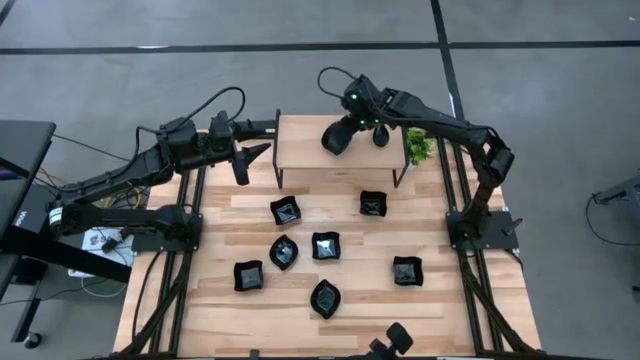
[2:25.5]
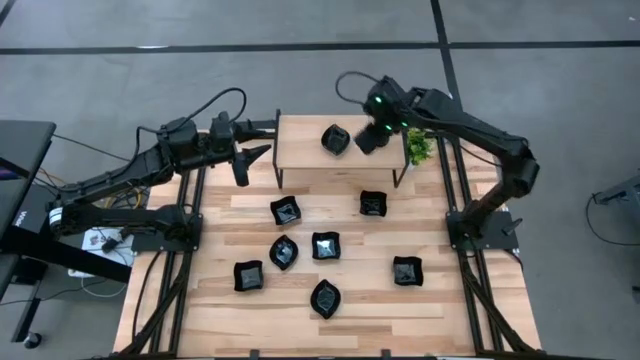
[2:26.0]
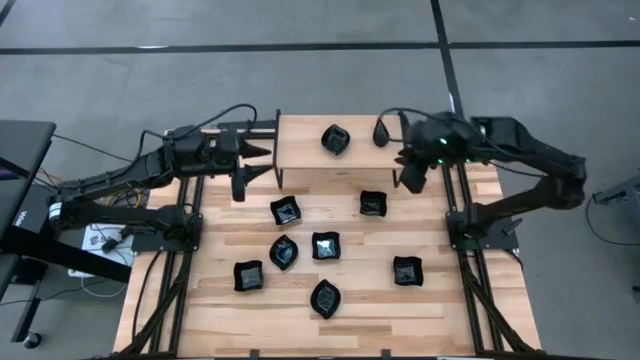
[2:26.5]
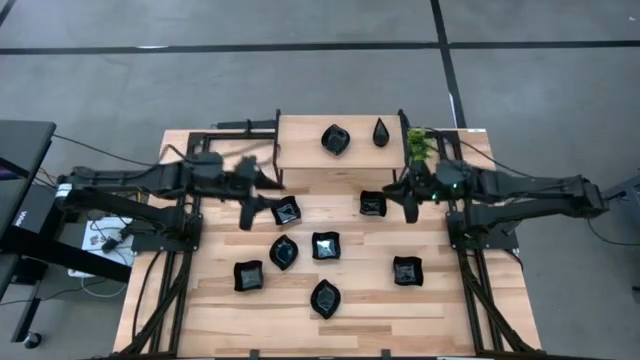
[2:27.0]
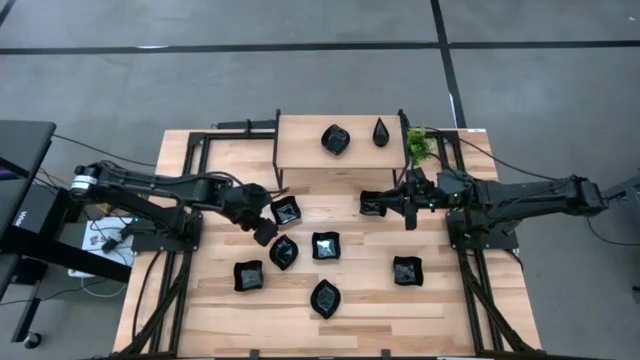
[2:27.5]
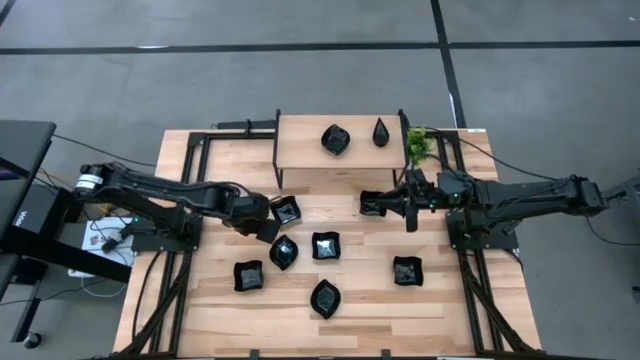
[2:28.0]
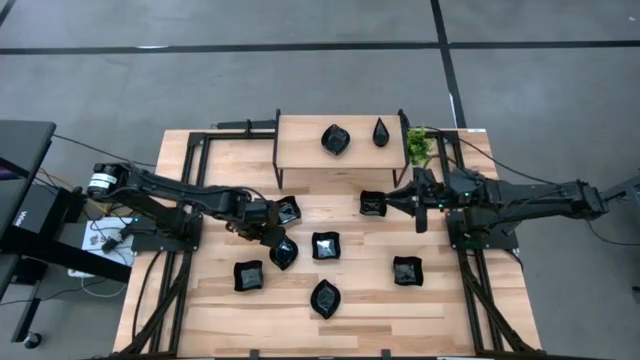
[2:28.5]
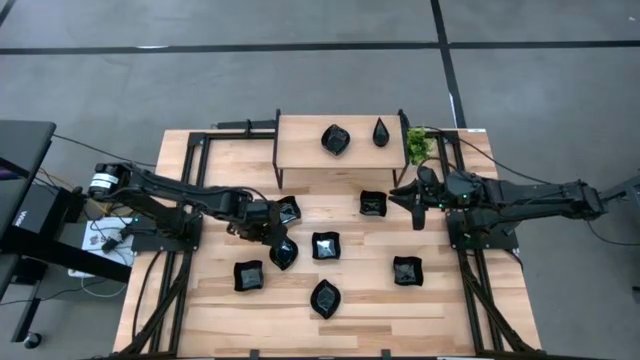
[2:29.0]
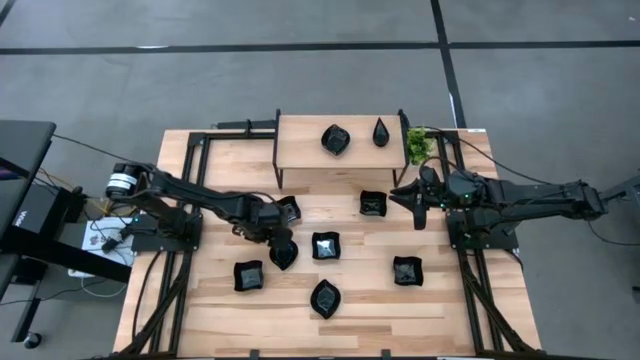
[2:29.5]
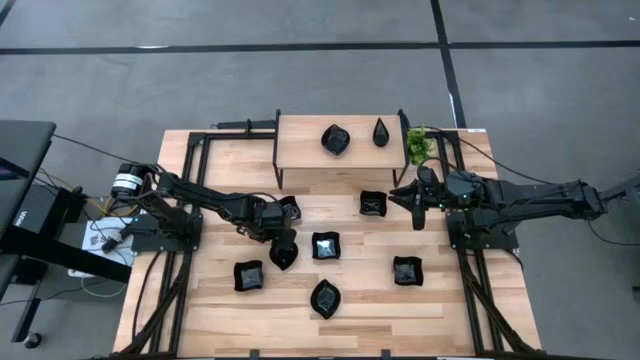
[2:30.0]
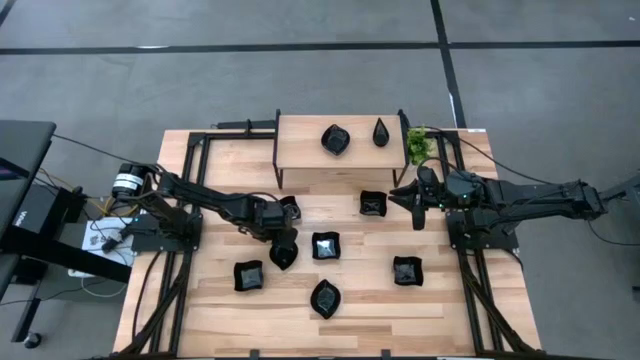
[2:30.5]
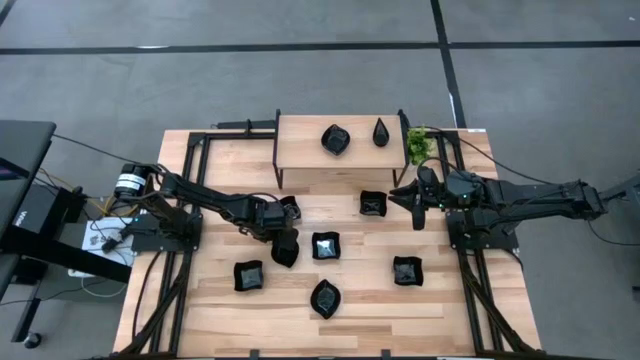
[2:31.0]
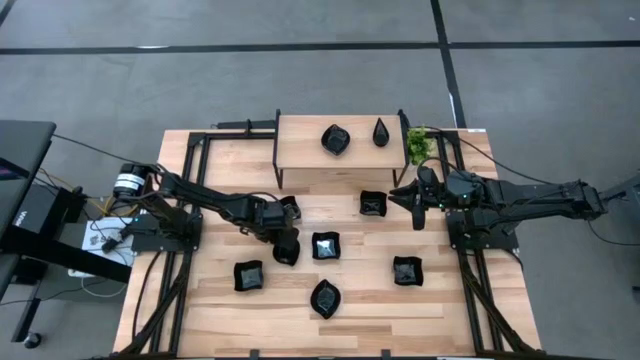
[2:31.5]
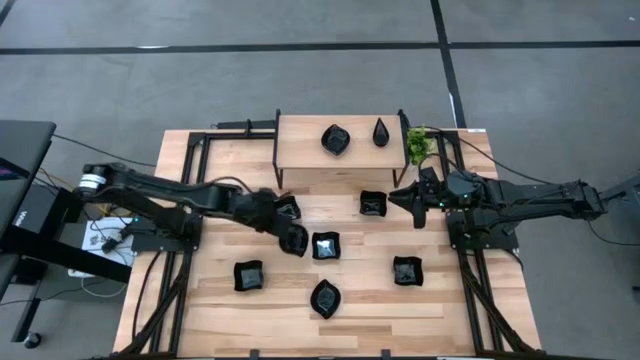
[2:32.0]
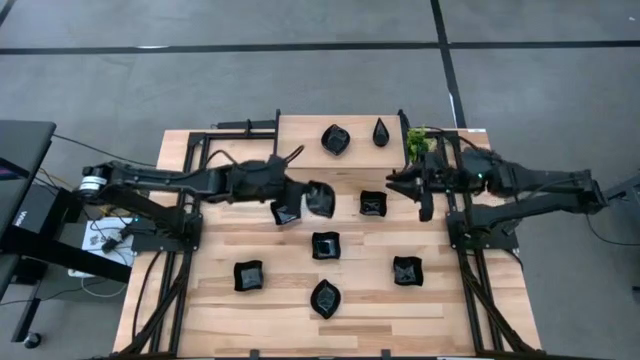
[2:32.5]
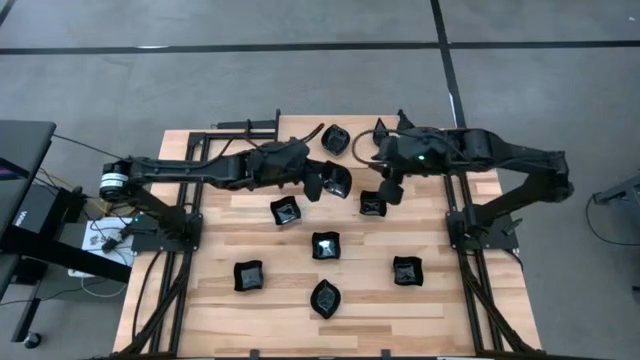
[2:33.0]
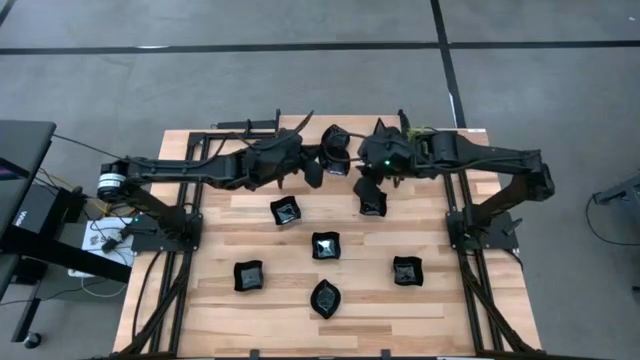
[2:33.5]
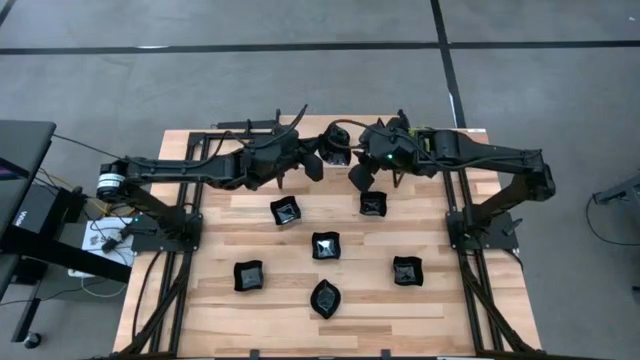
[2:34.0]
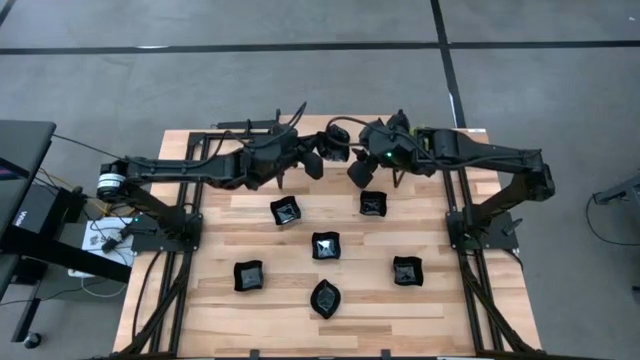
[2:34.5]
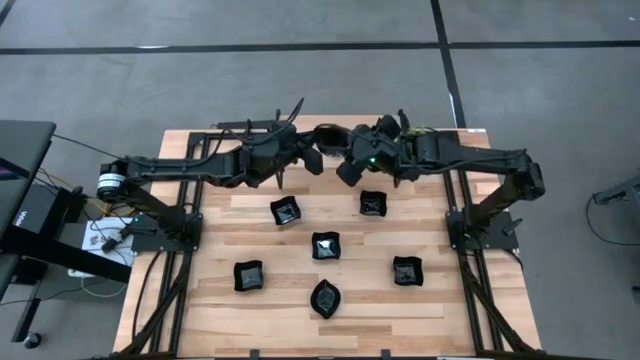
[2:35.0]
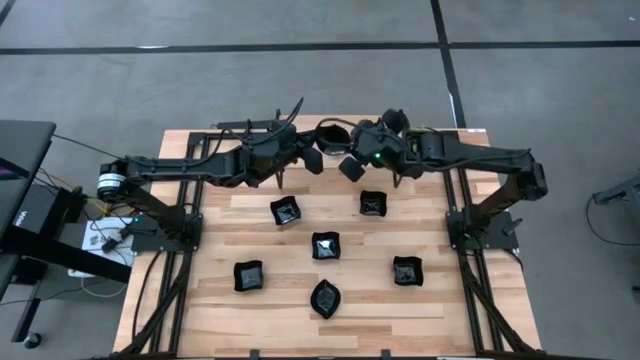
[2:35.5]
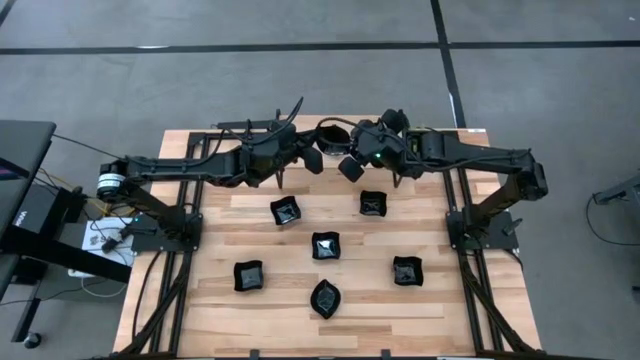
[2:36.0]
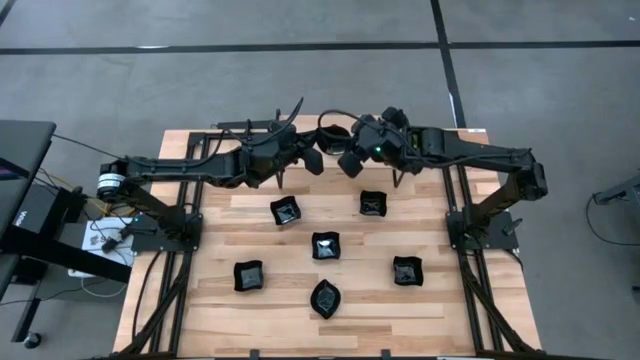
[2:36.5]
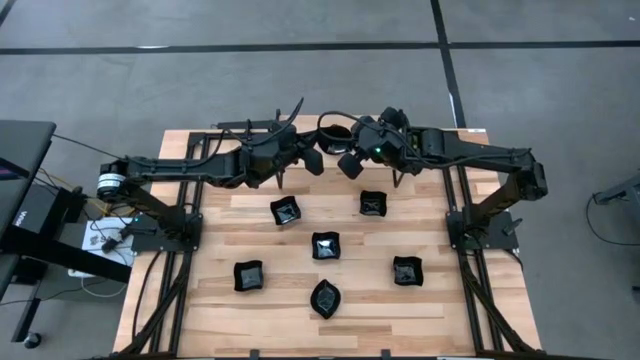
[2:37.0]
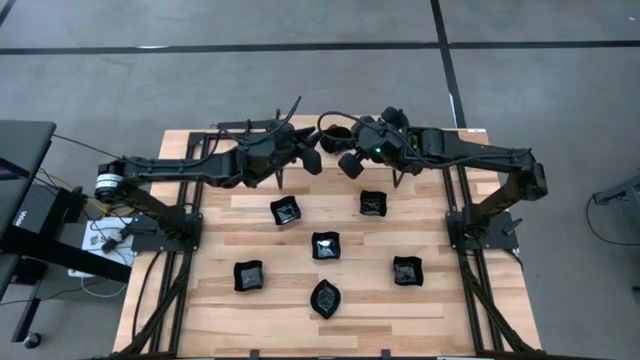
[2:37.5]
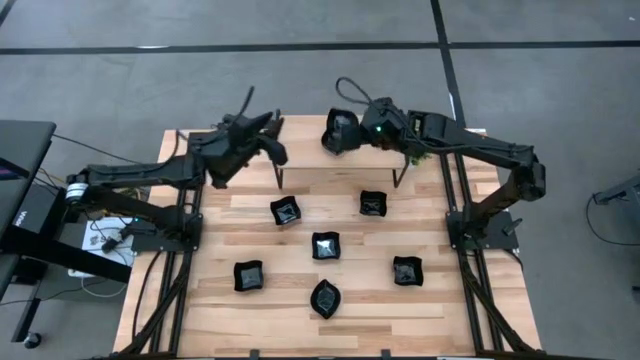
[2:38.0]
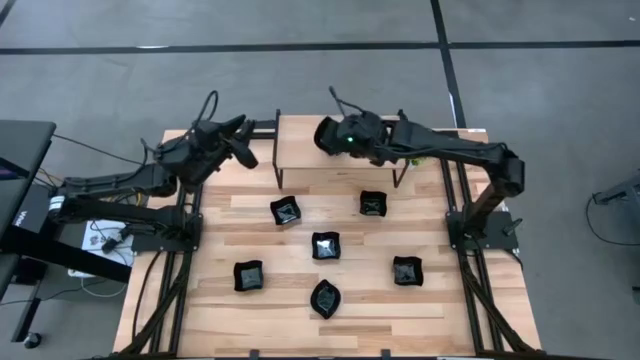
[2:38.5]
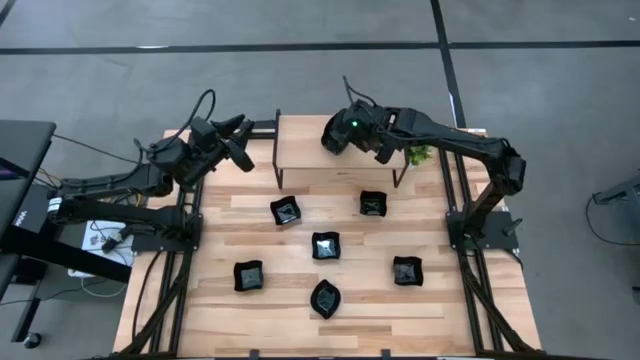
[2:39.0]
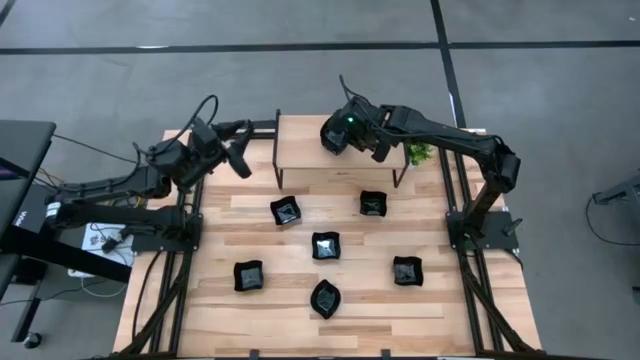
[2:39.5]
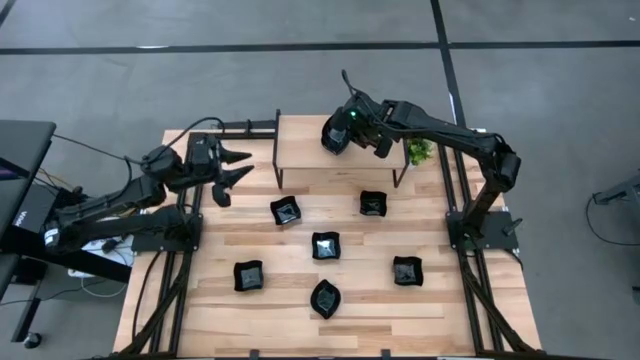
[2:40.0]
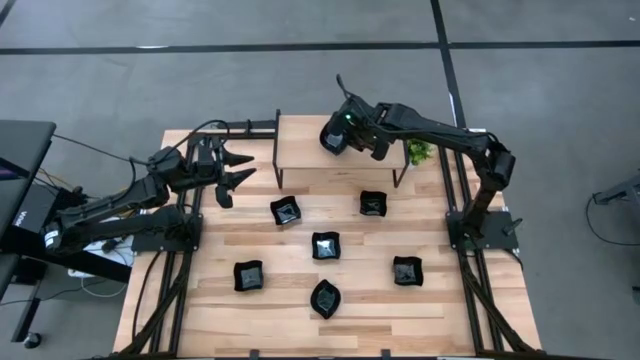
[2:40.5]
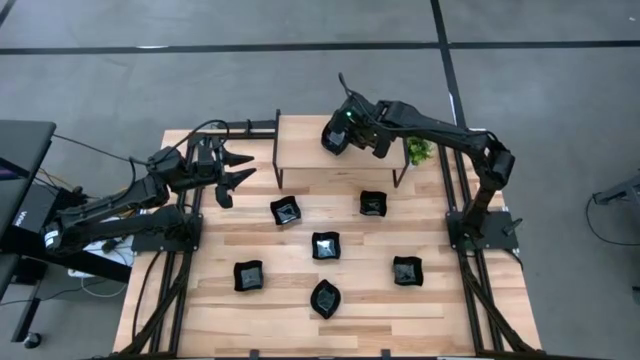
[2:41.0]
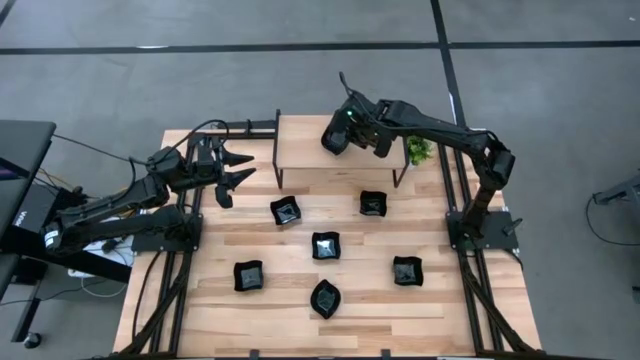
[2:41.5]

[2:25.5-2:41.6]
Task: Pick & Place Mini shaped plates
Stack the leaf-shaped plate on top of the leaf-shaped plates on the shelf

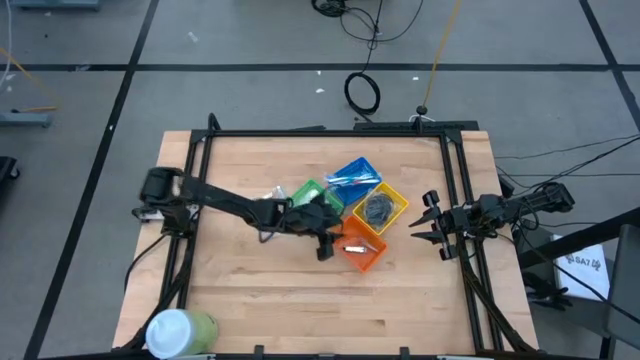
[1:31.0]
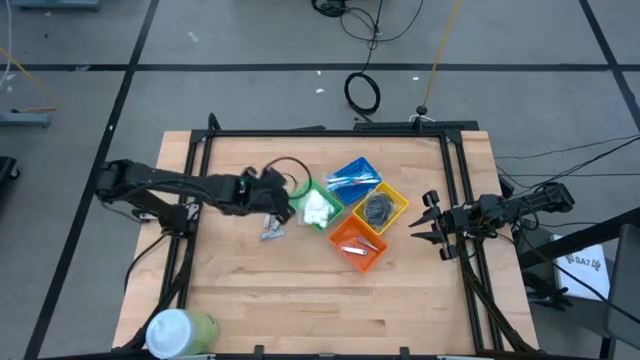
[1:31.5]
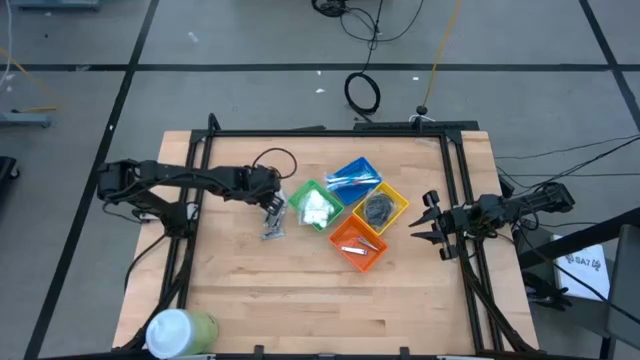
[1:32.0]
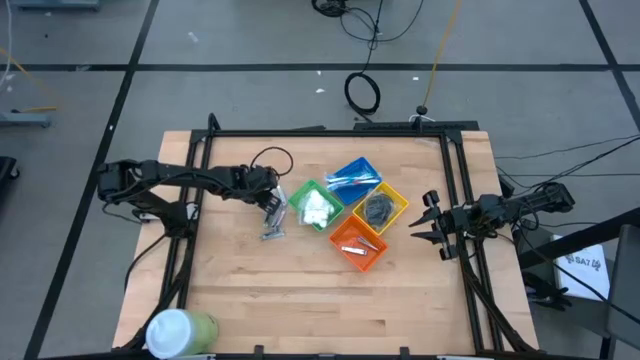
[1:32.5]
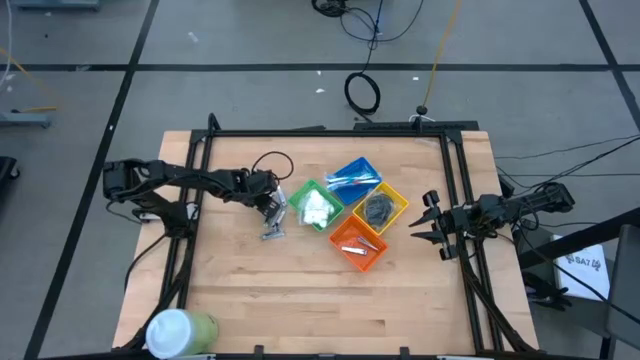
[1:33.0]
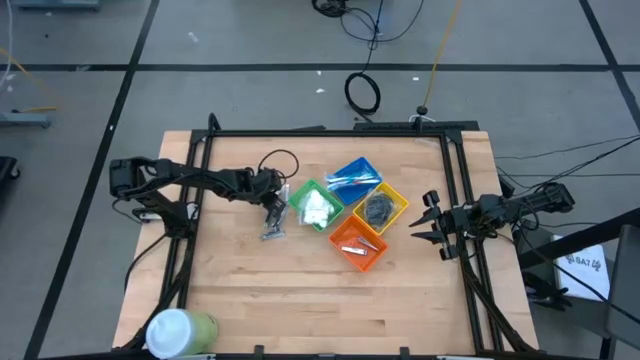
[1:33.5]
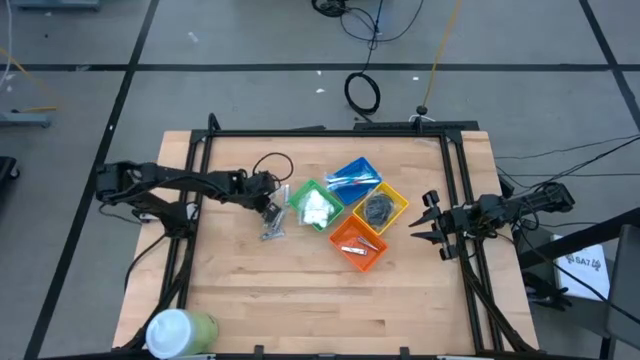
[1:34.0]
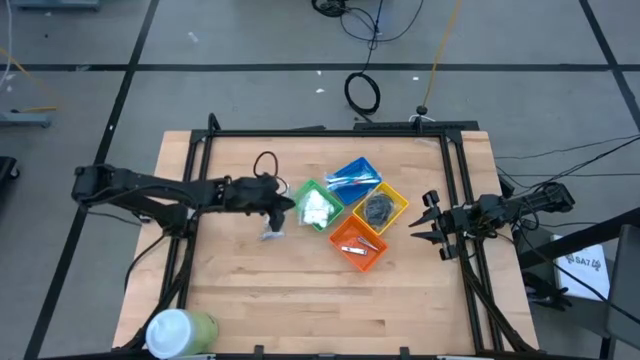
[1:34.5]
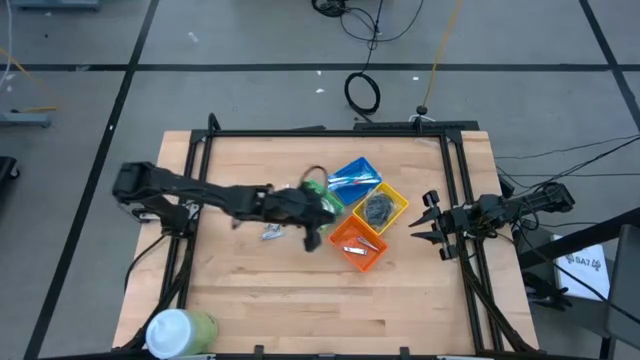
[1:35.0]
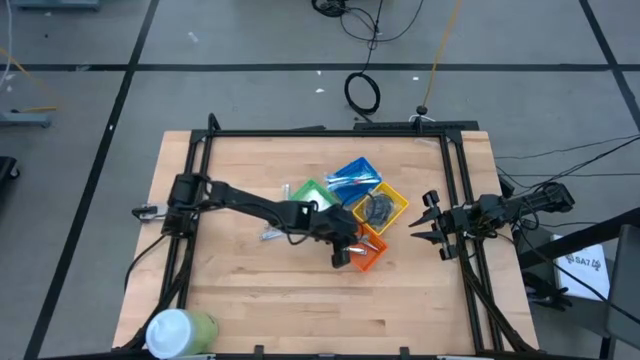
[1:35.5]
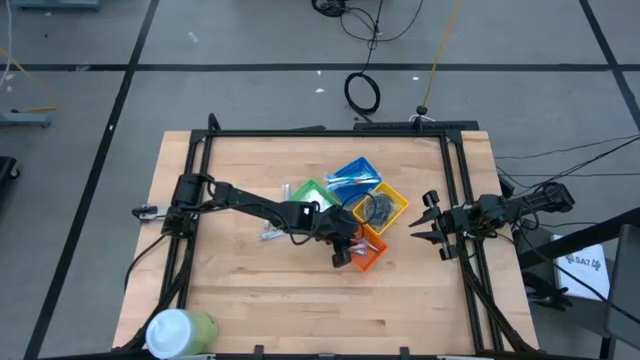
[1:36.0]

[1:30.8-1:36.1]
Task: Pick & Place Travel size toiletries
Put the silver nail cutter into the orange bin
